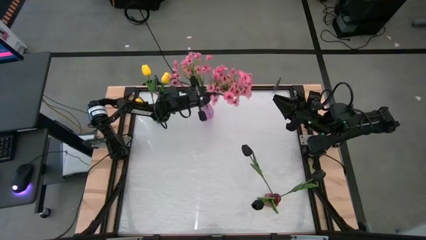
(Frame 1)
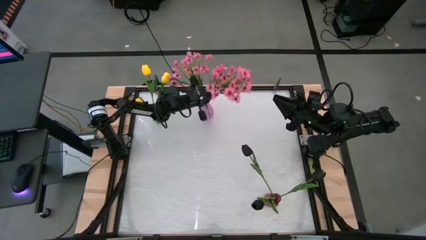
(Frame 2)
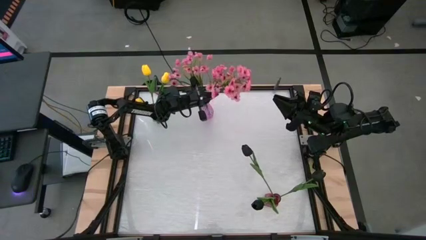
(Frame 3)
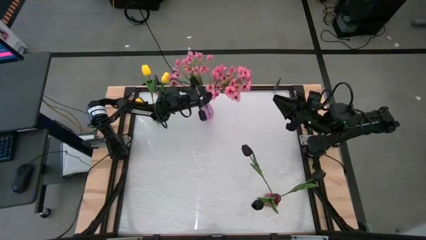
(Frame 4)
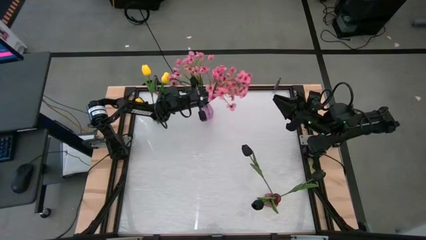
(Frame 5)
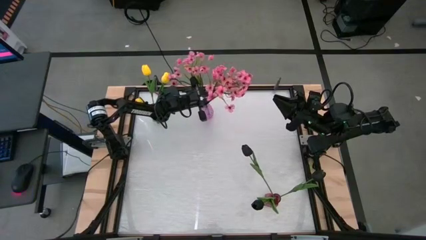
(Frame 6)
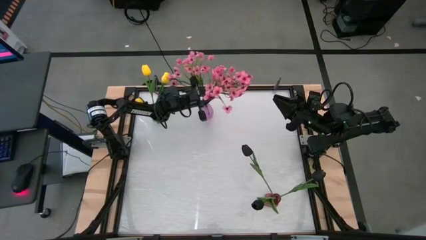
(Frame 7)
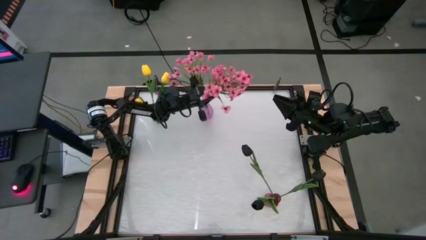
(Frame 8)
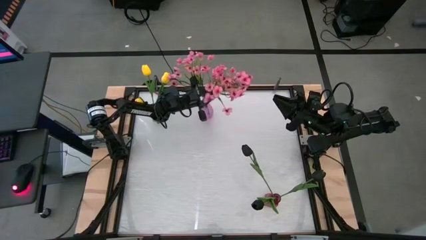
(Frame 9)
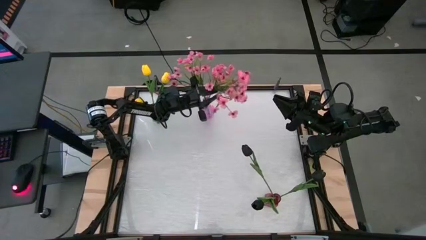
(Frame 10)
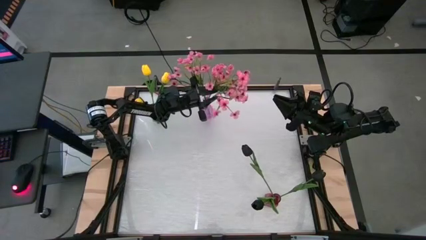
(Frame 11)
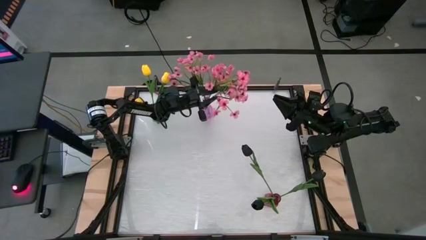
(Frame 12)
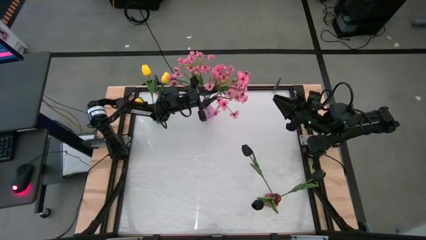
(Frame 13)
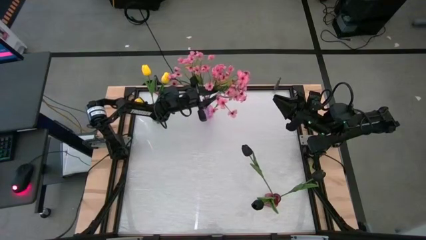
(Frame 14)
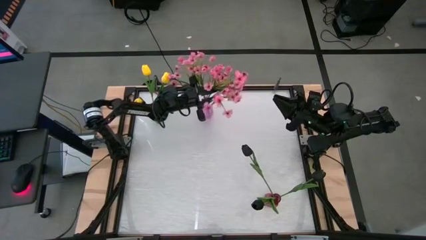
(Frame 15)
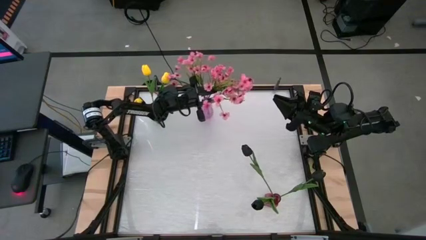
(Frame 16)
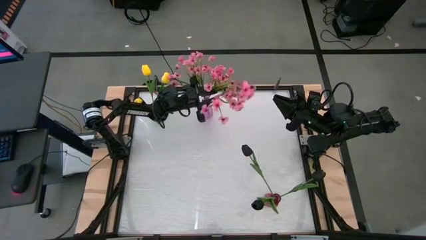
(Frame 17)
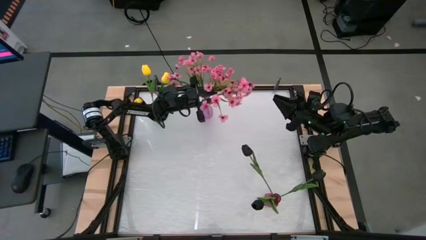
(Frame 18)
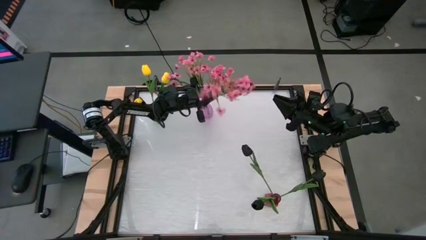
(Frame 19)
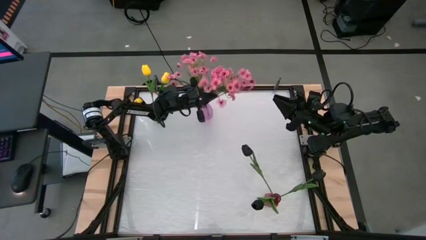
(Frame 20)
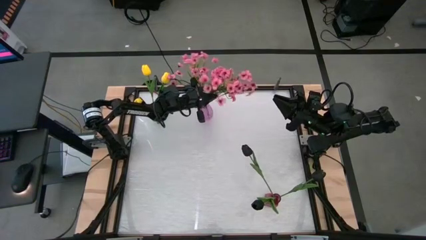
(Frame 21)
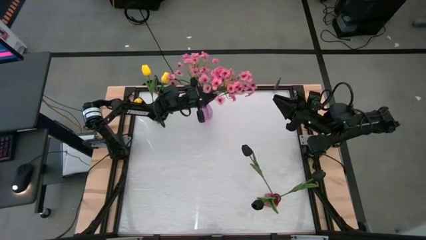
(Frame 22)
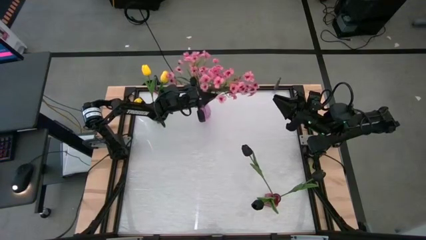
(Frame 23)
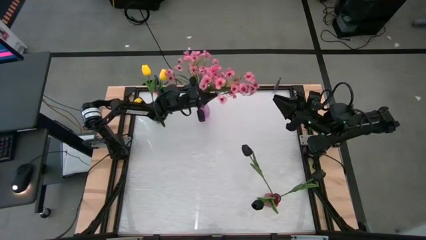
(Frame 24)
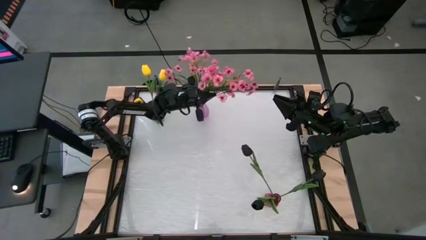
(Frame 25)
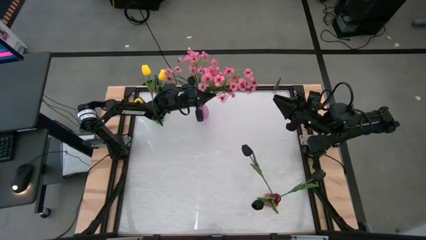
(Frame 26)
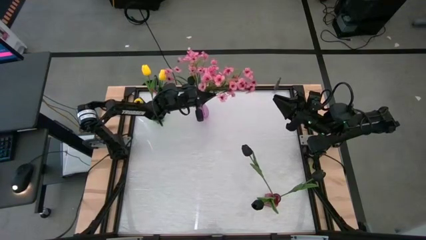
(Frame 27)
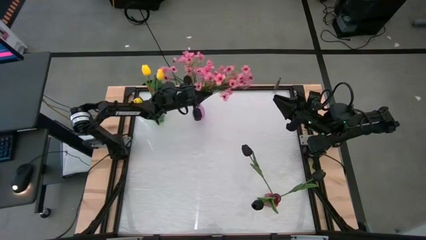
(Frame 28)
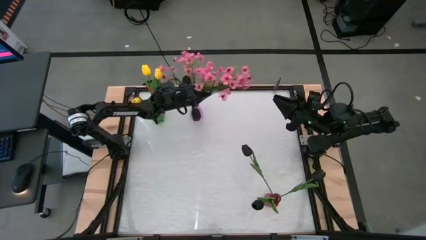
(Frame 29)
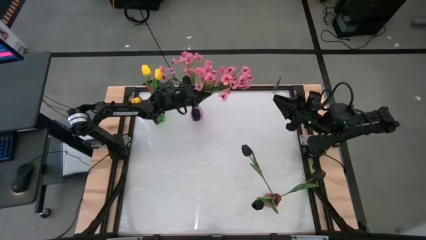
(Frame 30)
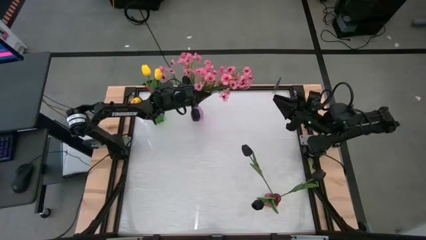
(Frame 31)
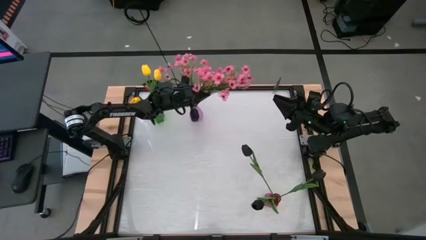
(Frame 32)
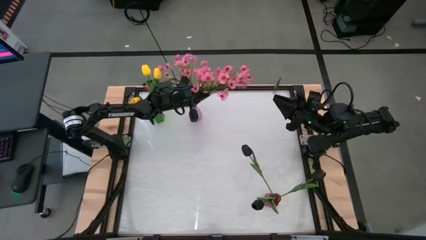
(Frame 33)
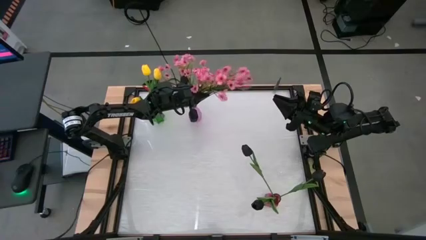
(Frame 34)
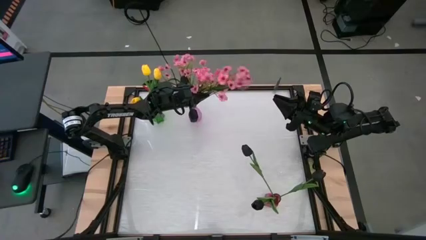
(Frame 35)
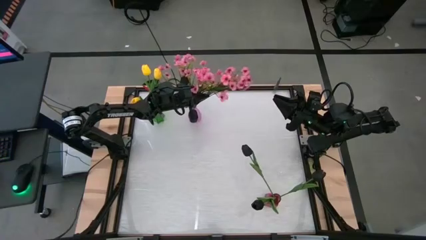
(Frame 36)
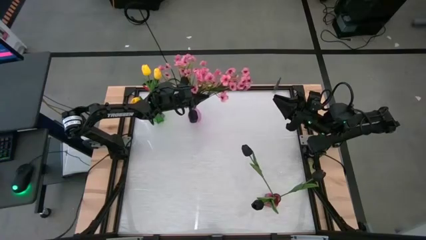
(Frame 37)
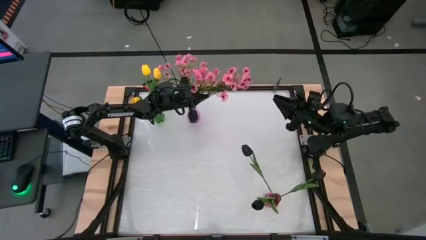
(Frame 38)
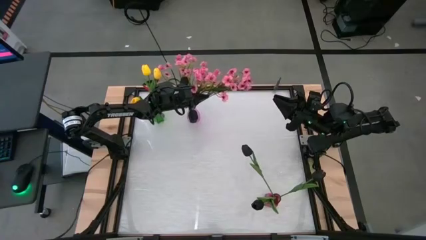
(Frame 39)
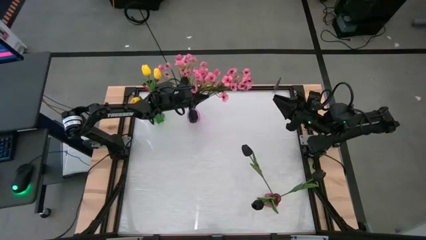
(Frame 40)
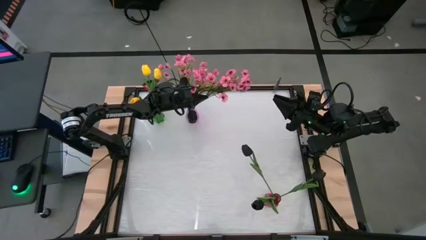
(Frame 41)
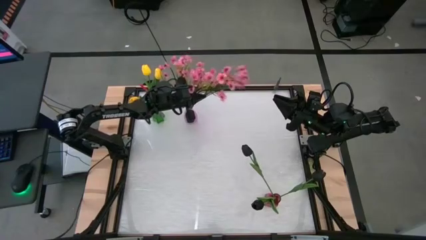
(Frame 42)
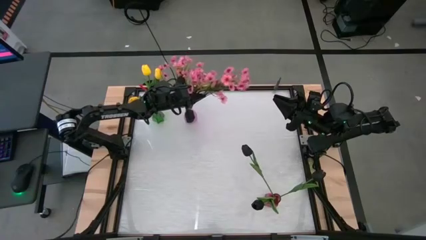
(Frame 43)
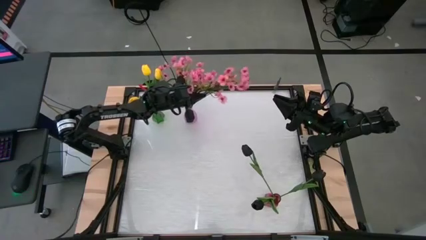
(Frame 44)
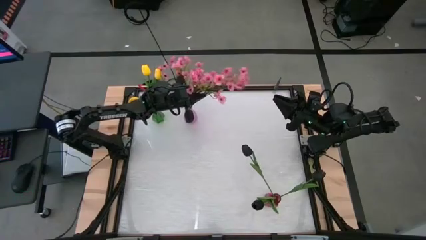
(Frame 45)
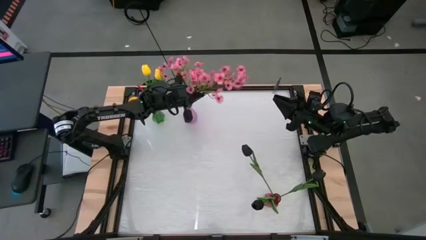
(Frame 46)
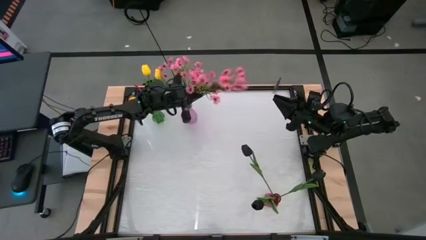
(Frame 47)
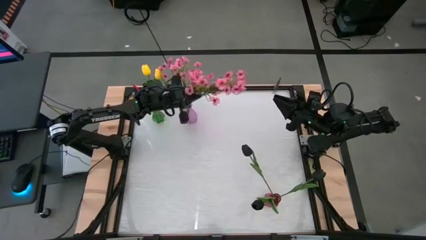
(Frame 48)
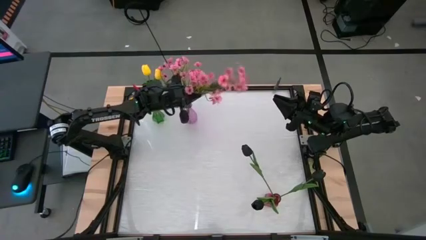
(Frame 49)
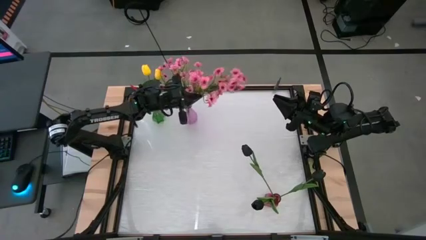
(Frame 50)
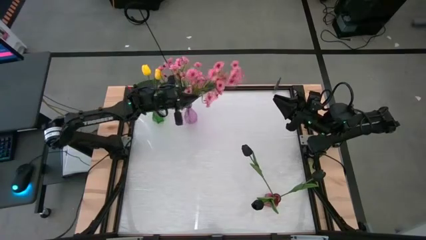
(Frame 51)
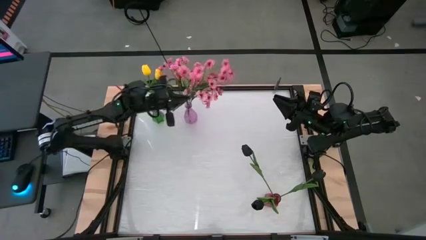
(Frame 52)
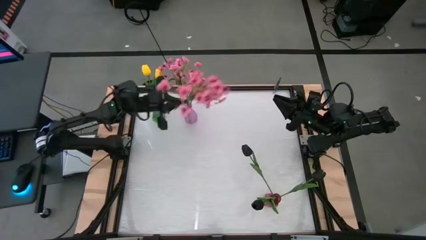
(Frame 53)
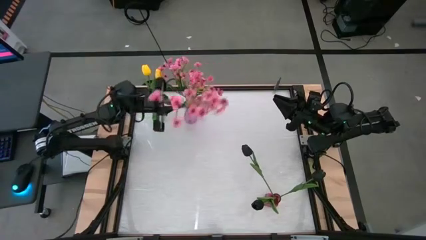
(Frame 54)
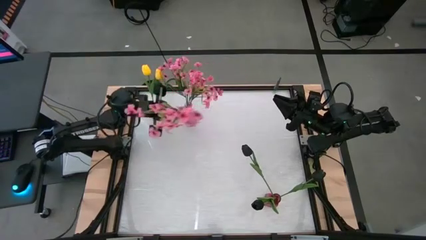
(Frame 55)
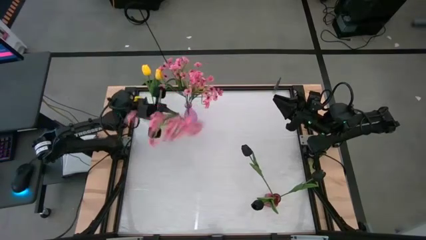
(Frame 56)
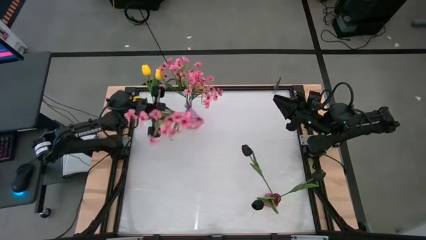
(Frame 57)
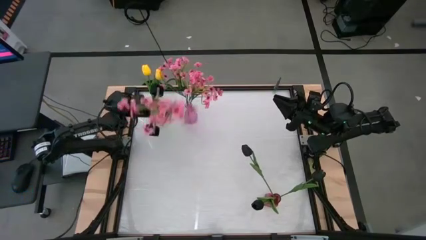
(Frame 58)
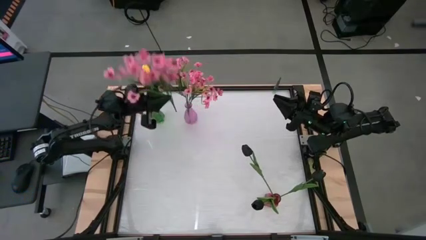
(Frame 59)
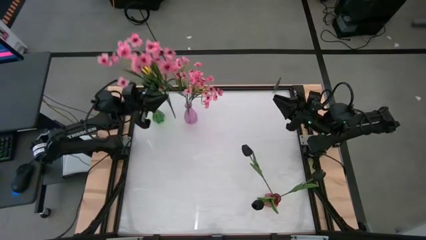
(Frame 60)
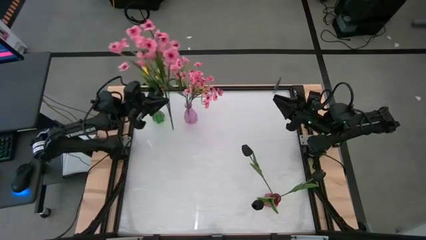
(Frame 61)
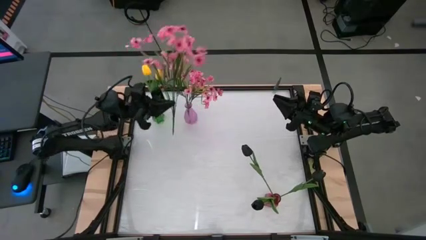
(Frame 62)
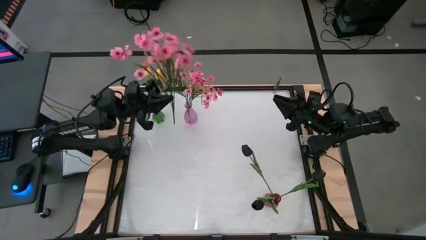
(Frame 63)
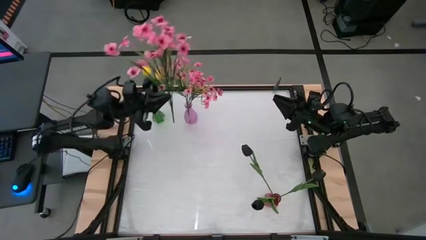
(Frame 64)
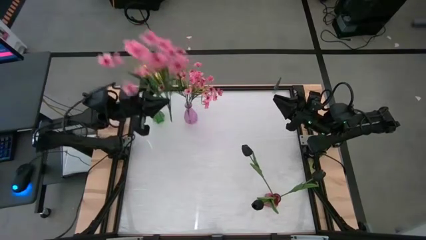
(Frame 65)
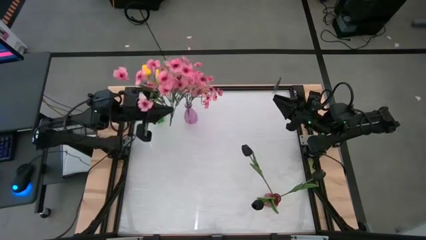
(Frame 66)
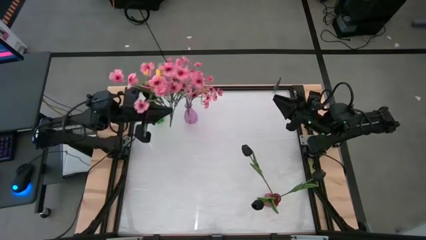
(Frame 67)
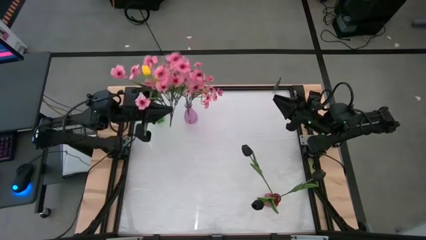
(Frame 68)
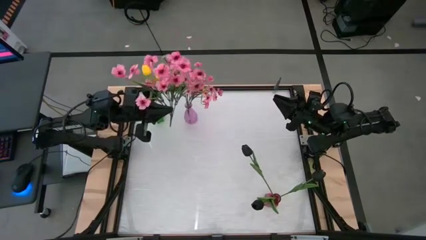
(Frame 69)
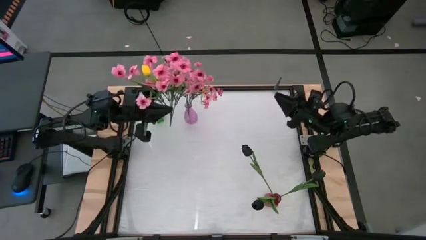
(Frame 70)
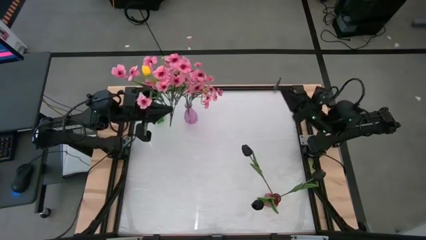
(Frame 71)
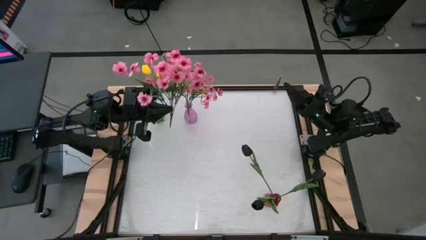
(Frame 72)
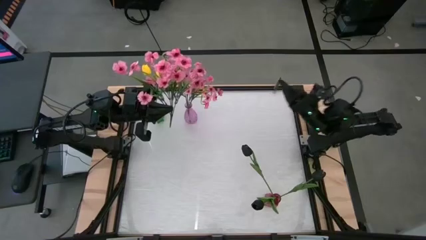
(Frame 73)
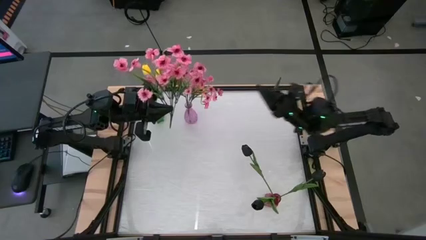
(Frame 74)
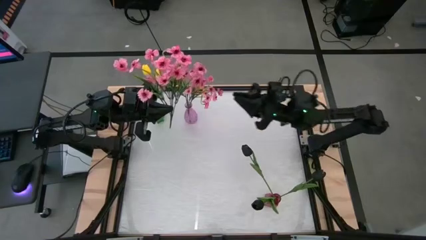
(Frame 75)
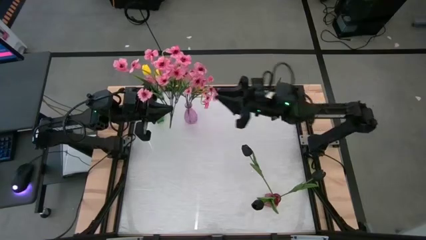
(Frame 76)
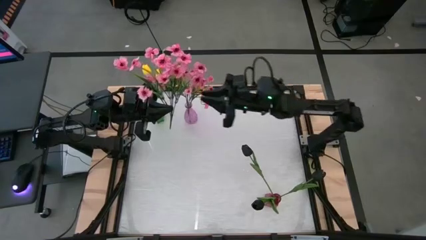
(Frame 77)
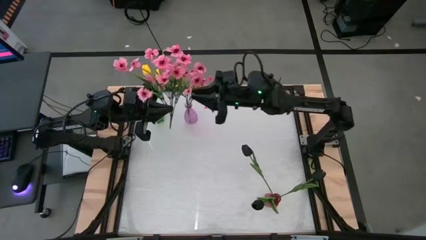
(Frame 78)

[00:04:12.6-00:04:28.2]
Task: Sort flowers into vase by color
Put the pink flowers into the purple vase

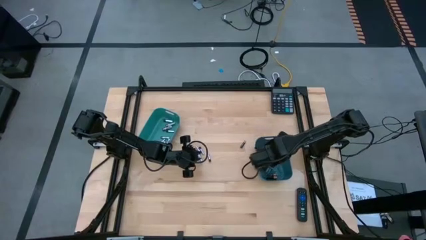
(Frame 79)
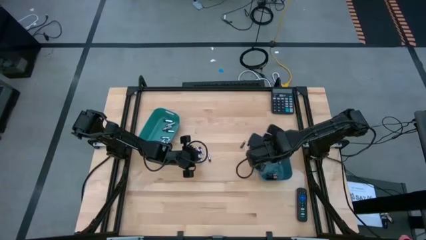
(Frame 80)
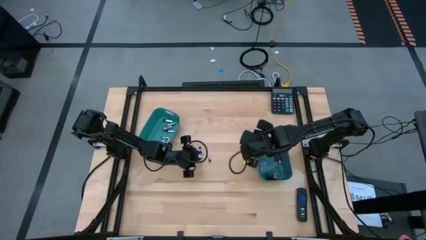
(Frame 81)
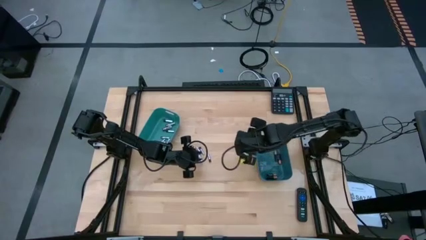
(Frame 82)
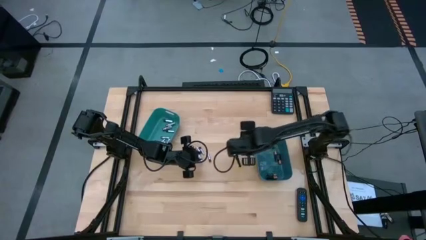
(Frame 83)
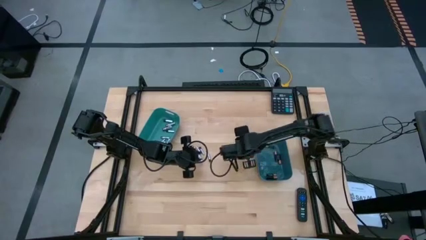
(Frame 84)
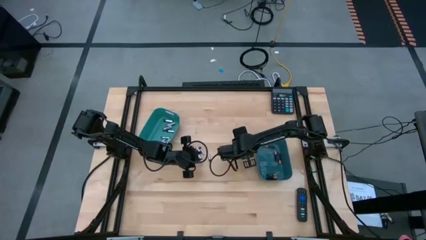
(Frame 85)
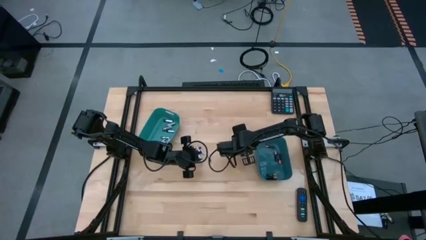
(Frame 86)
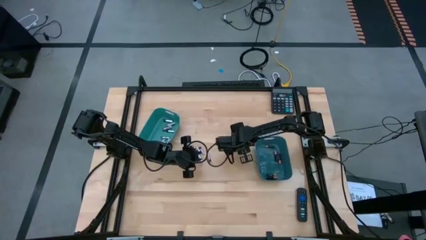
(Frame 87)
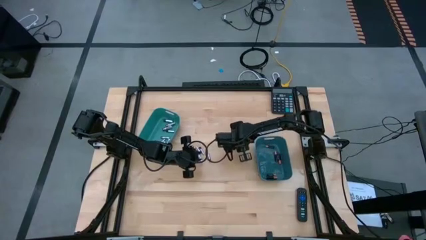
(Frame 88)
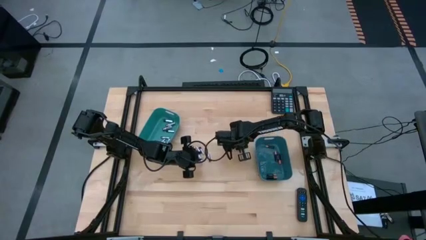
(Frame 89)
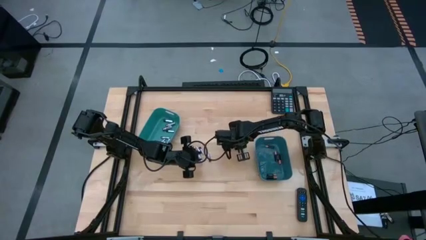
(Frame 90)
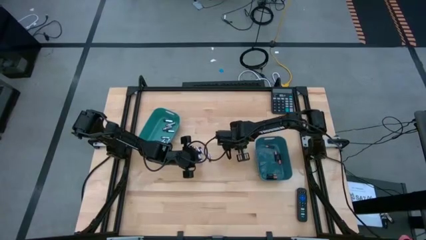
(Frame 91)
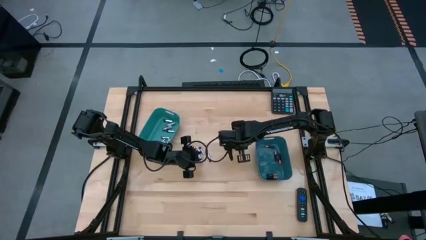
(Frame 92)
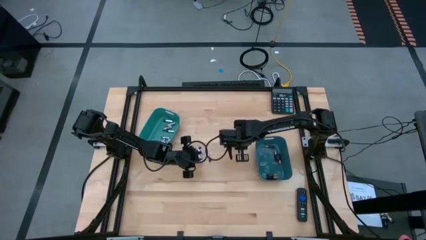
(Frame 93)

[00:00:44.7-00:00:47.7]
Task: Sort batteries
Put the black battery into the blue bin
